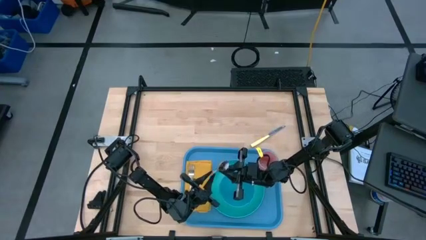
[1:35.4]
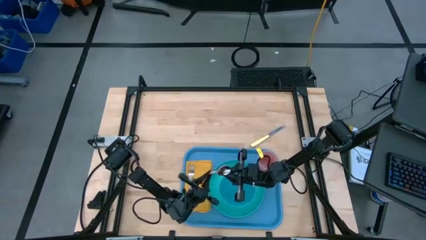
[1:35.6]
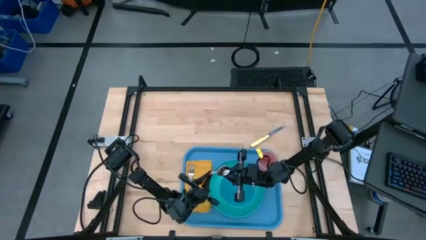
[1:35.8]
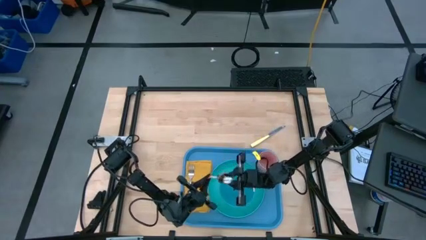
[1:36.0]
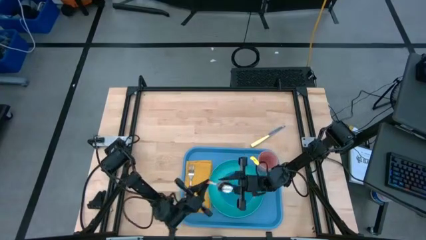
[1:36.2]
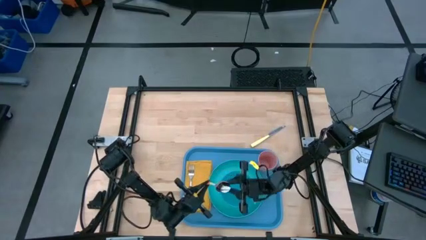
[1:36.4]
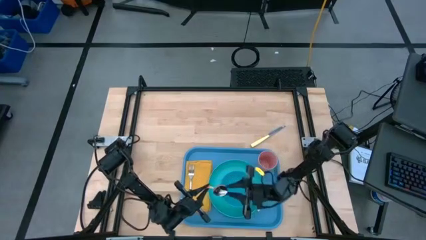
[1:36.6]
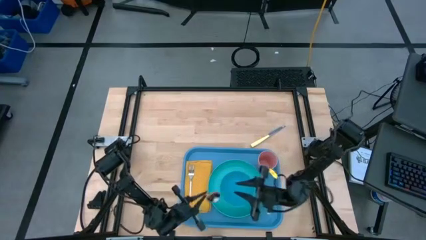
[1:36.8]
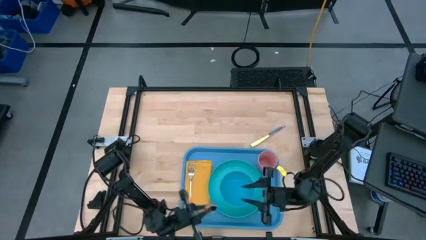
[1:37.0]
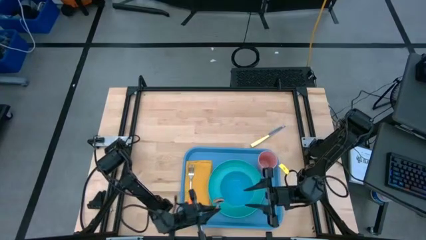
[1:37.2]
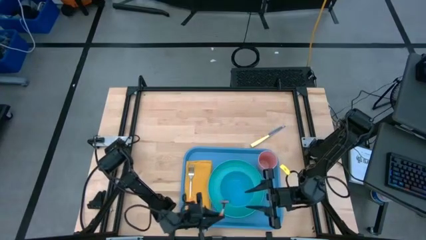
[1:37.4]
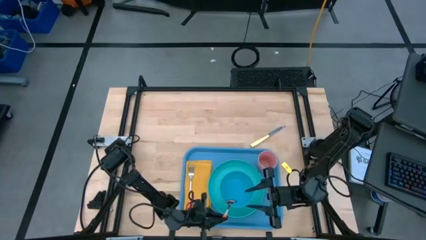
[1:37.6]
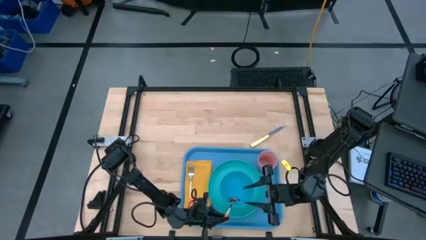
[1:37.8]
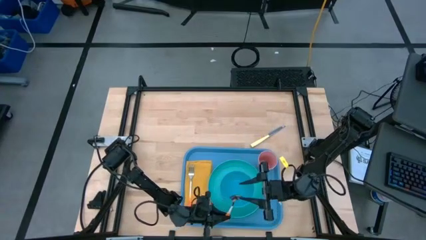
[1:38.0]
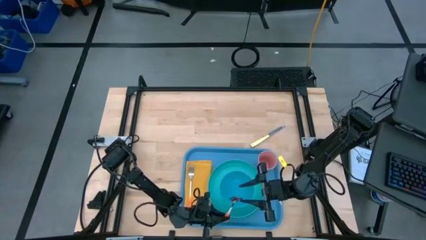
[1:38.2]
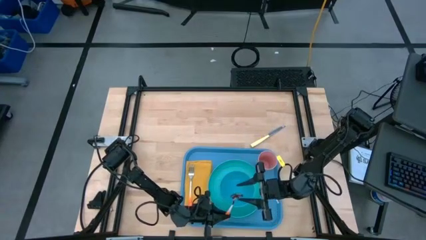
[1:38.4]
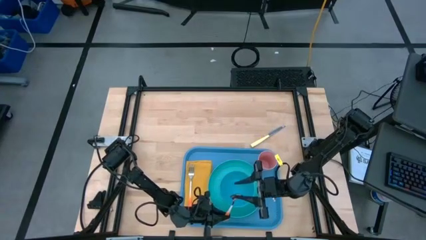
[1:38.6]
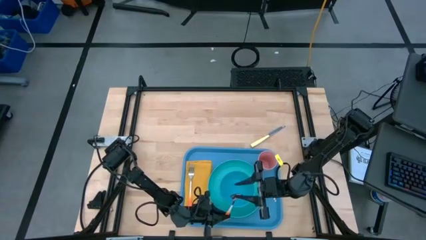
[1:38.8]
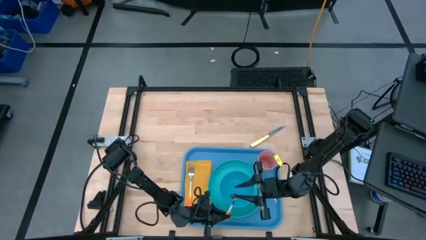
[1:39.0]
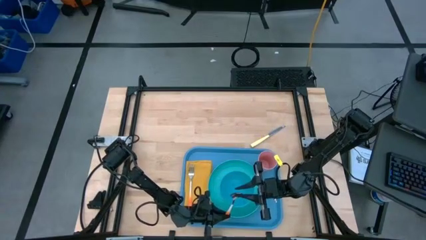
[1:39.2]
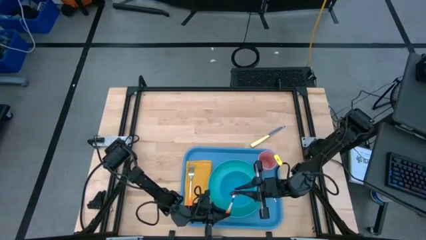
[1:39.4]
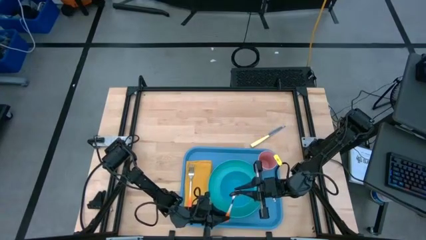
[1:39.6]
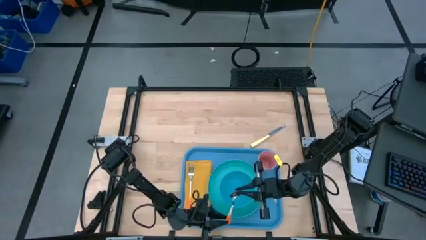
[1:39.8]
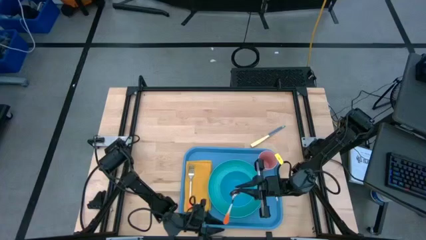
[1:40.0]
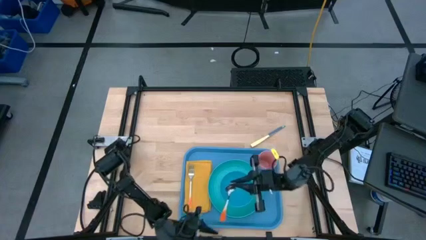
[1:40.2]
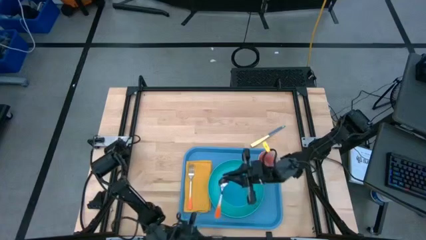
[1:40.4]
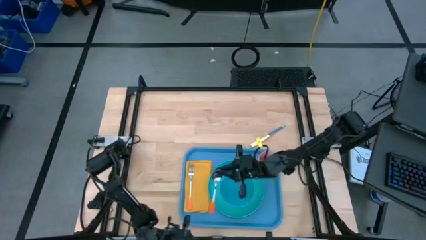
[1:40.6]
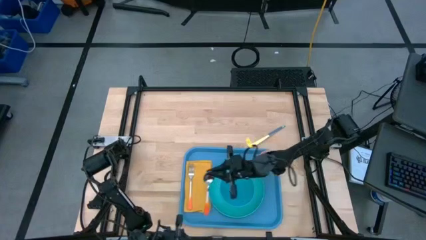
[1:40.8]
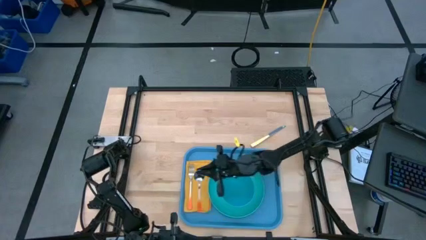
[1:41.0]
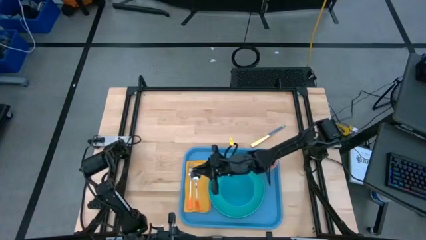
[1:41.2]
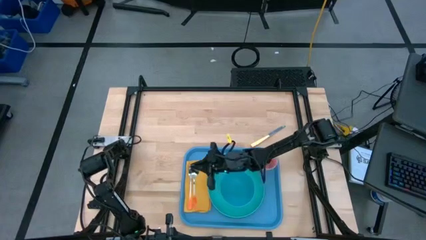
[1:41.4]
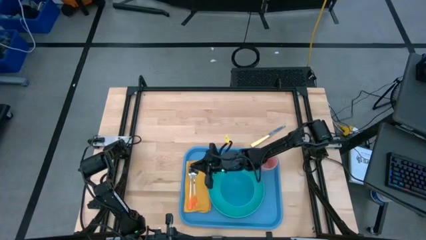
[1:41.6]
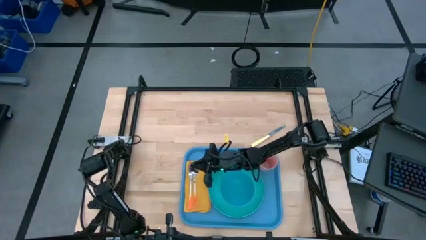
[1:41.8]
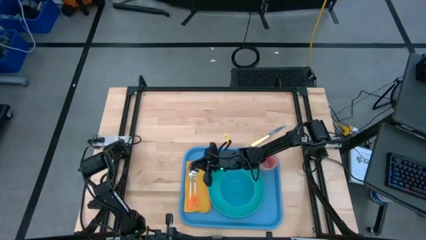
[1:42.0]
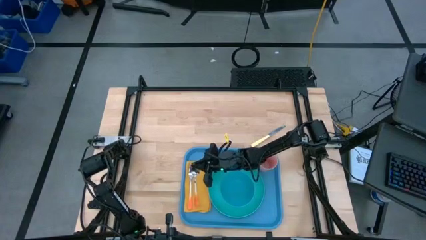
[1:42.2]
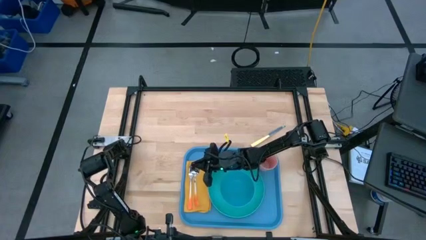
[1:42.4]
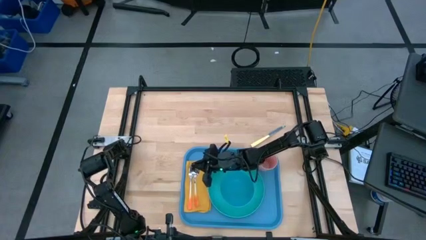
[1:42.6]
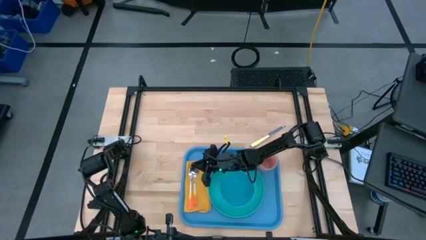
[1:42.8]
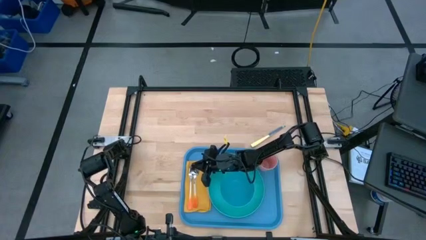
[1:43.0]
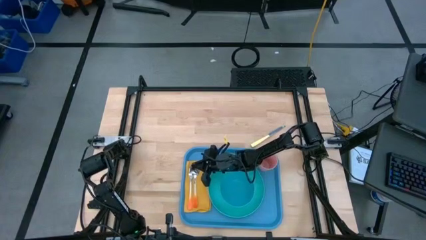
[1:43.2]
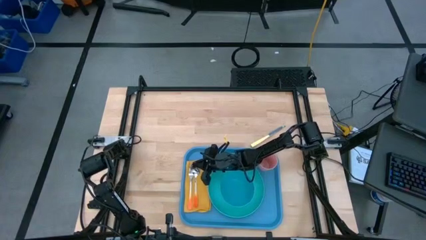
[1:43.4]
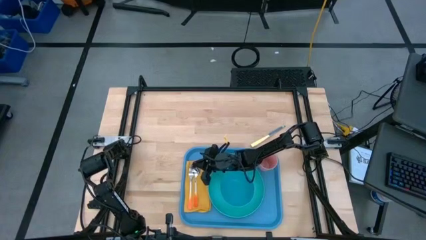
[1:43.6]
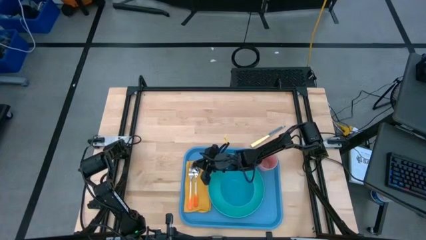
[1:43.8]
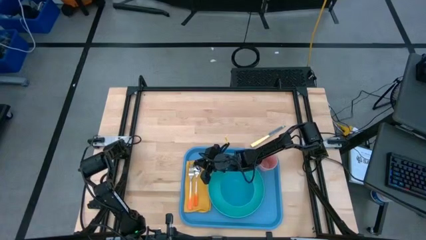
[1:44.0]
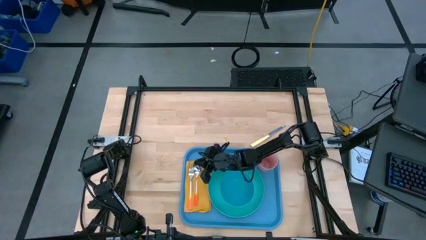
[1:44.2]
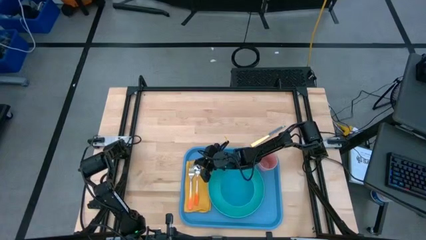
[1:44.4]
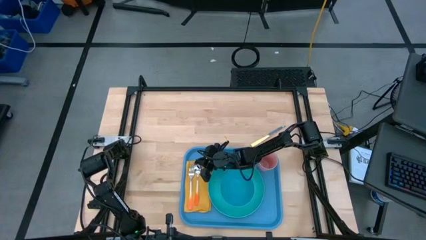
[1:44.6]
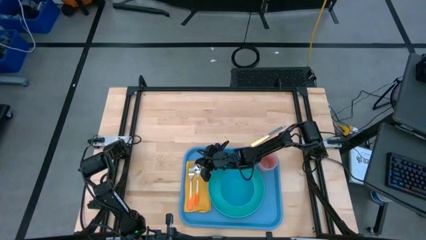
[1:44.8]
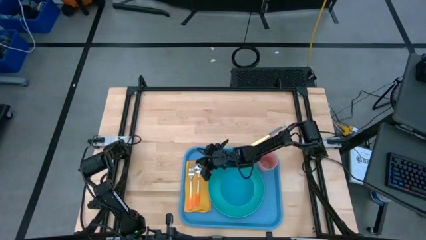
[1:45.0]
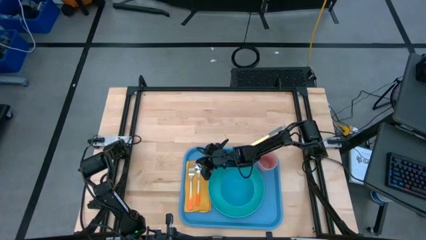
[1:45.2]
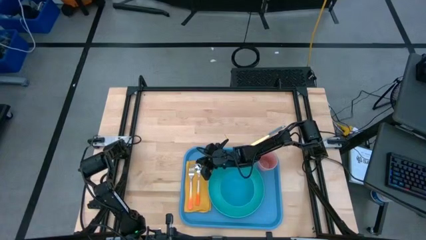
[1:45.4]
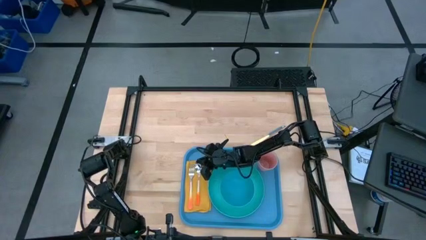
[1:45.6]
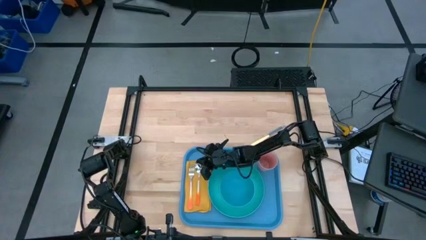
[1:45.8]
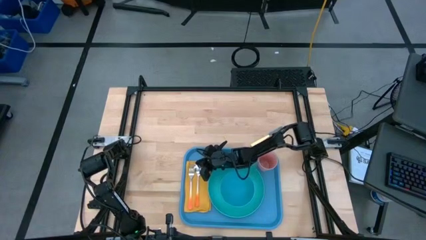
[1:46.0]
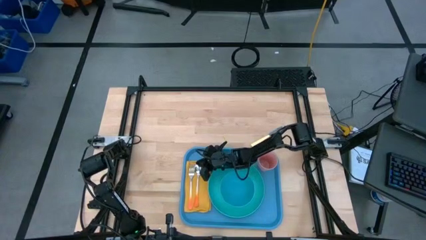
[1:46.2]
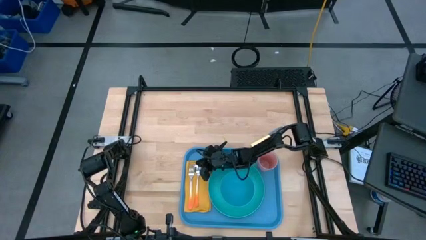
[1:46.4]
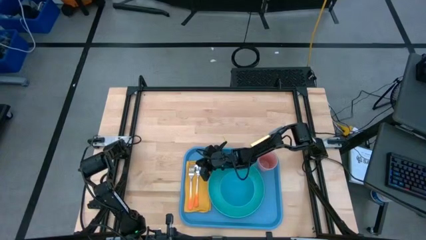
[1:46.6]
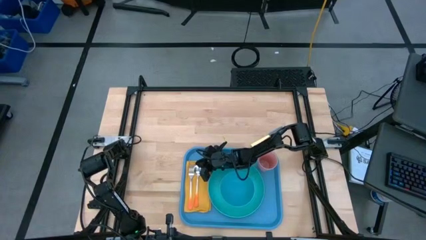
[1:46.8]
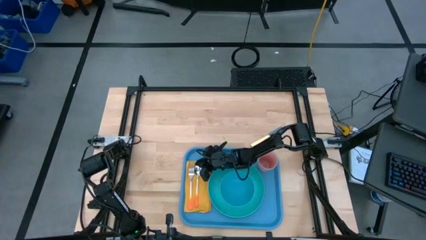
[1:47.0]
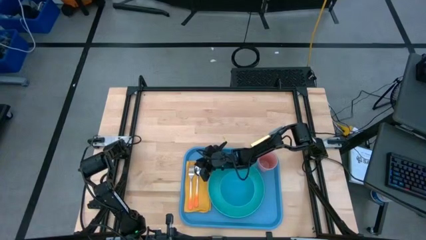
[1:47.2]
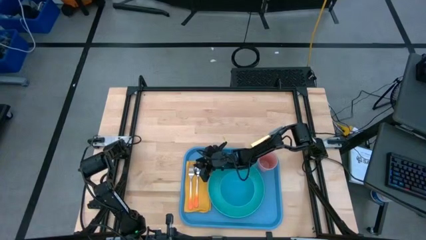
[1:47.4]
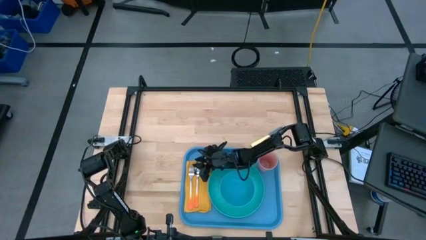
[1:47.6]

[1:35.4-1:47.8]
Task: Set up tray
Put the spoon beside the fork on top of the napkin

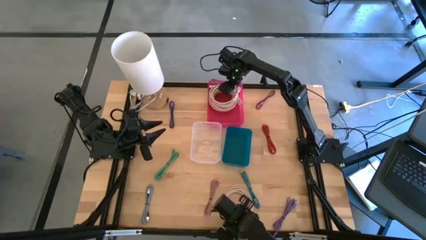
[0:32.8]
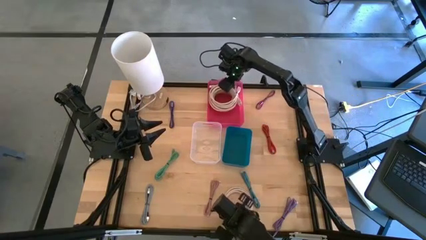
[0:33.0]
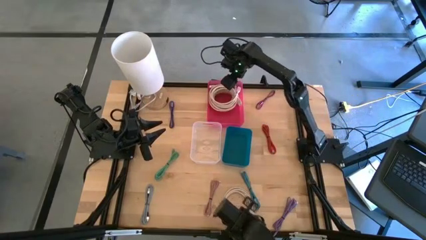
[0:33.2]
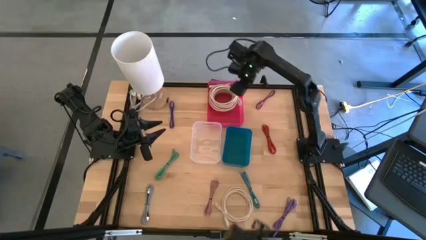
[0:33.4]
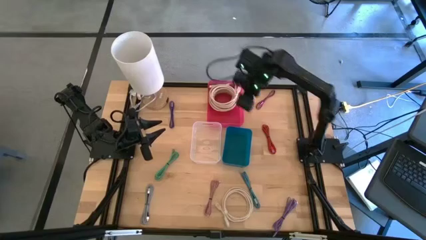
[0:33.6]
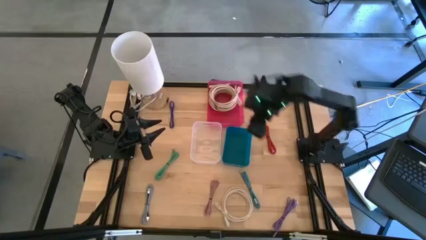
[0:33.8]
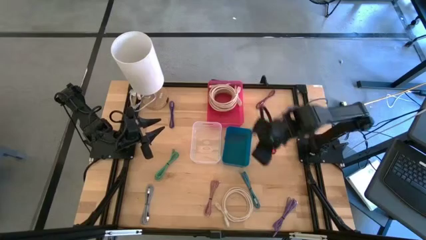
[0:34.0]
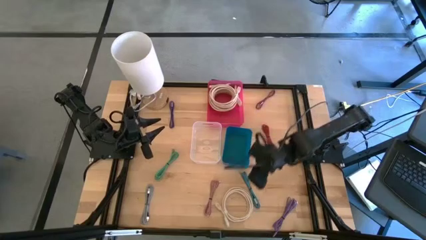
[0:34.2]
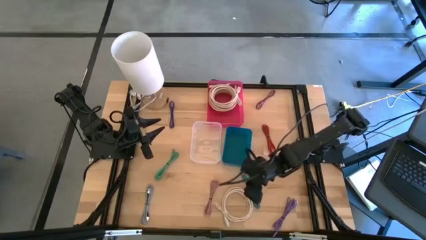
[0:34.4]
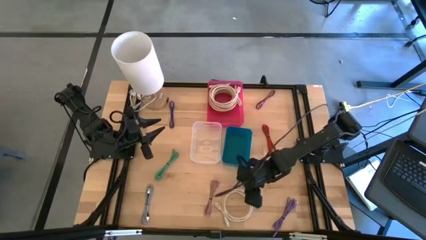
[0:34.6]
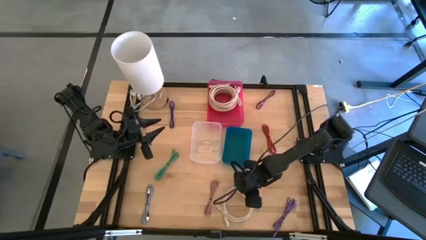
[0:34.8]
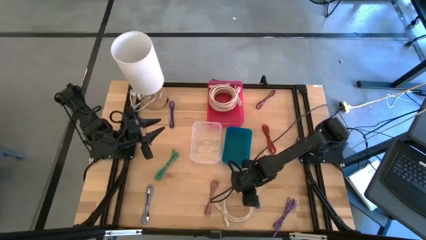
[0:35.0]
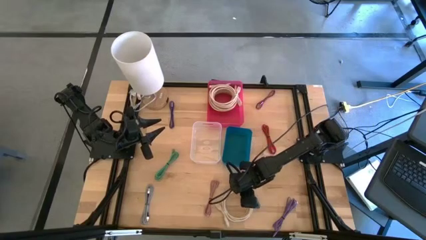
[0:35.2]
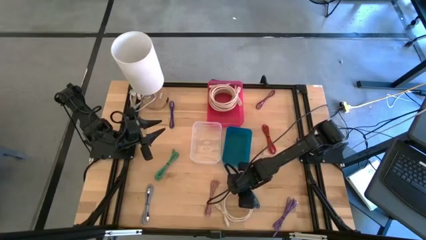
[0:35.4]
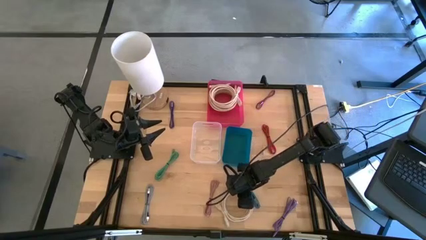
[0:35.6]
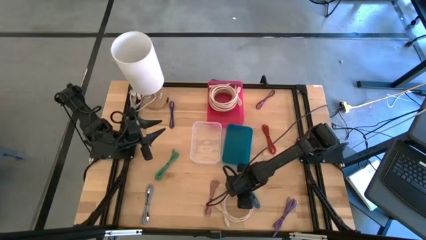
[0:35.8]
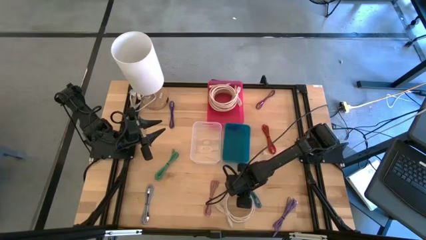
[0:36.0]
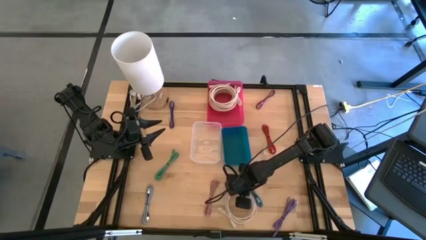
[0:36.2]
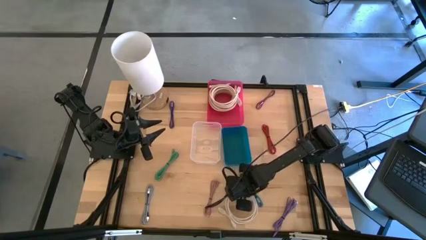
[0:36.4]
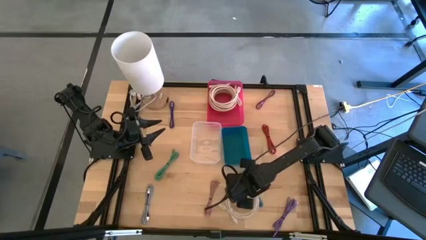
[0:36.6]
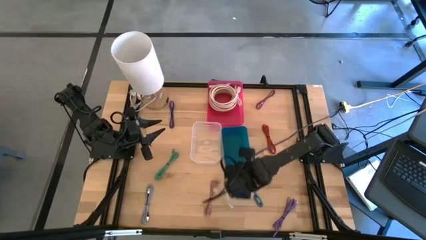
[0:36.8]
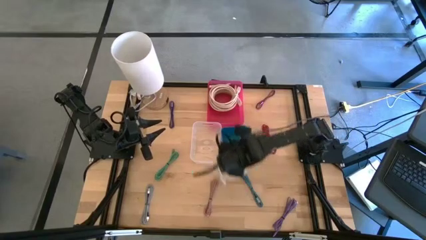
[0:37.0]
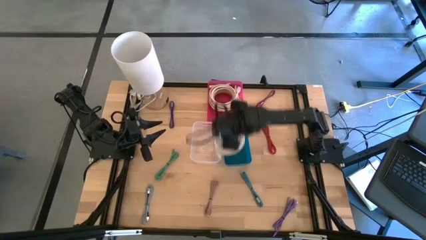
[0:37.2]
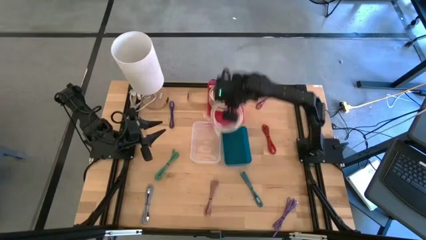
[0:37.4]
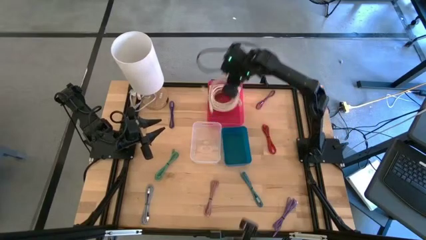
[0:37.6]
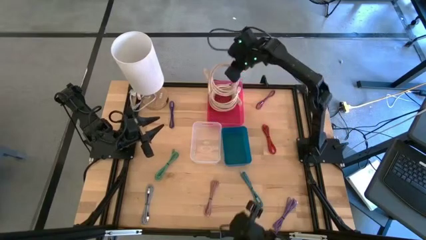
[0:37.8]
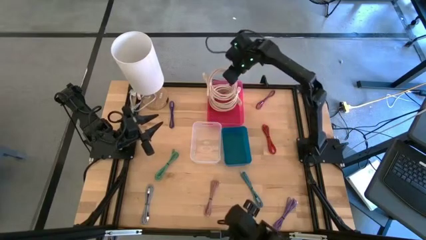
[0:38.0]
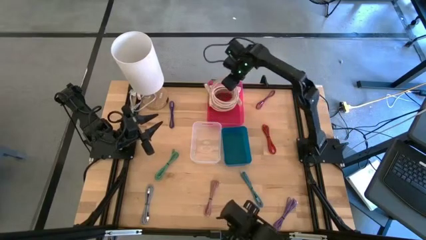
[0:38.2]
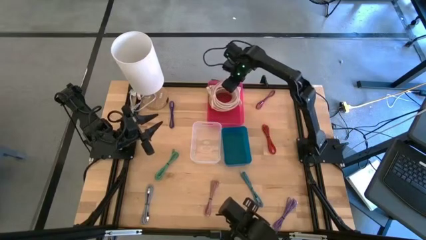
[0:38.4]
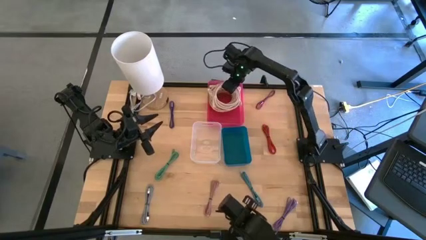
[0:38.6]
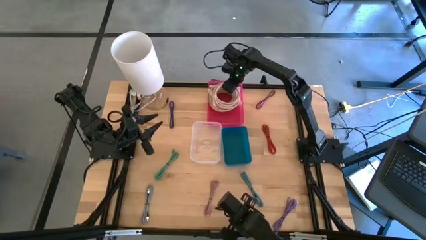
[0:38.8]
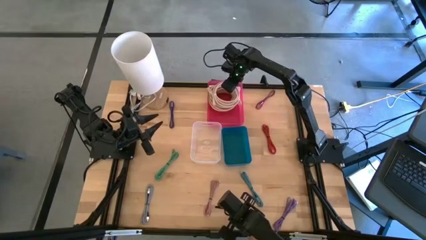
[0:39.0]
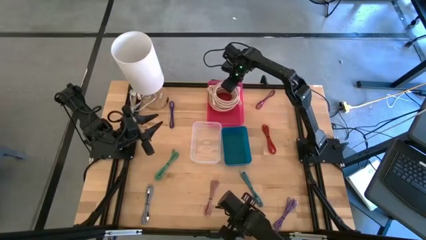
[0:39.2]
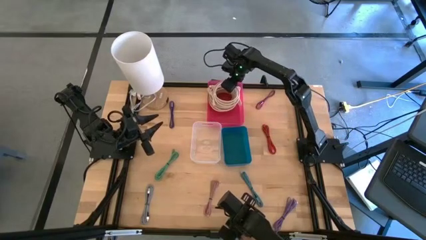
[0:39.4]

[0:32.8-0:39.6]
Task: Pick & Place USB Port
Put the light brown HDMI cable into the pink bin
